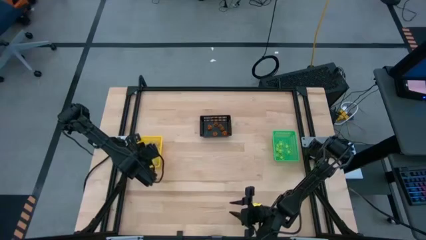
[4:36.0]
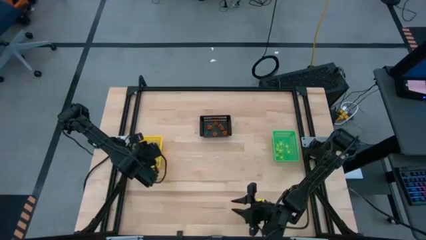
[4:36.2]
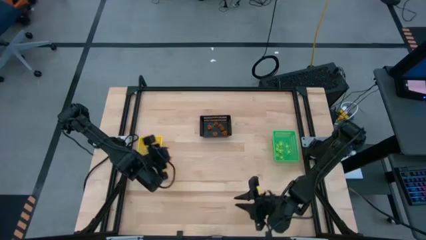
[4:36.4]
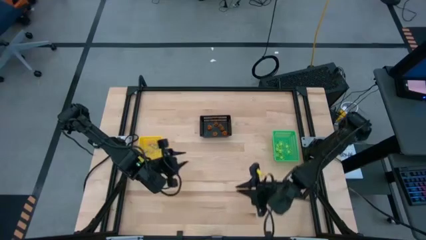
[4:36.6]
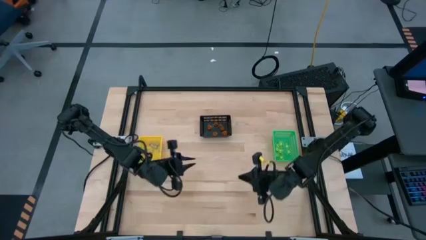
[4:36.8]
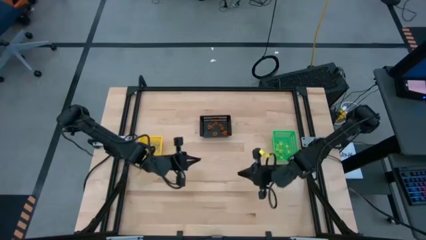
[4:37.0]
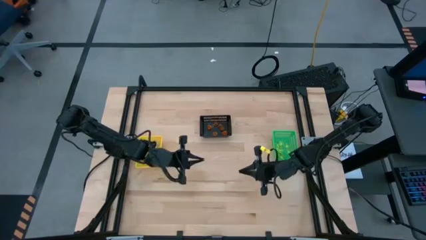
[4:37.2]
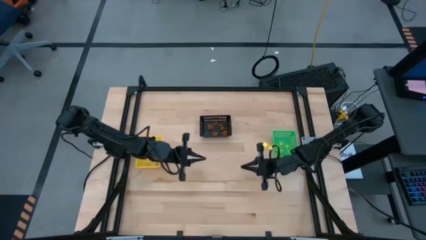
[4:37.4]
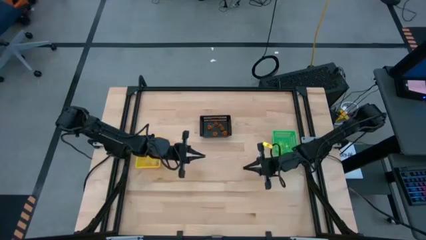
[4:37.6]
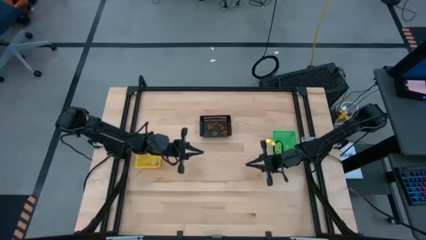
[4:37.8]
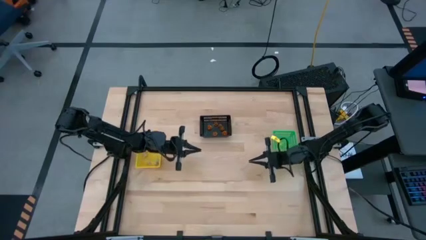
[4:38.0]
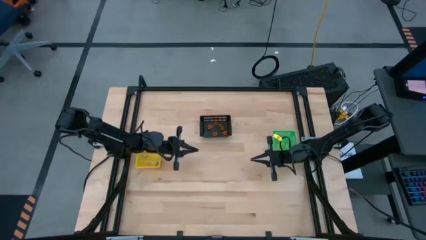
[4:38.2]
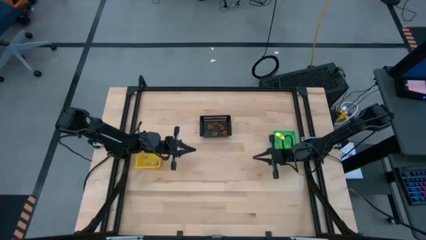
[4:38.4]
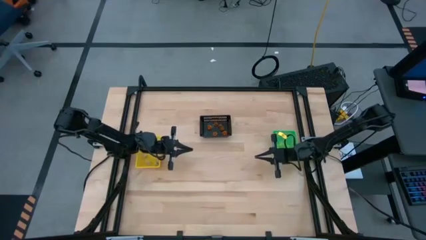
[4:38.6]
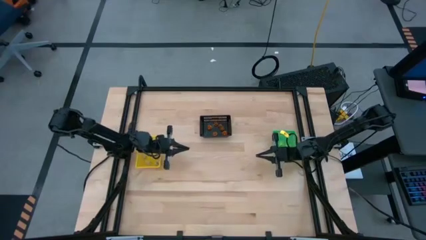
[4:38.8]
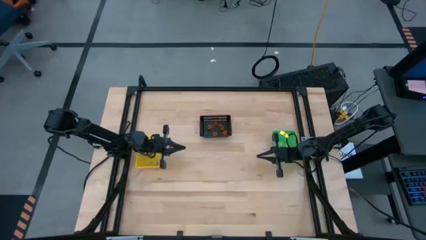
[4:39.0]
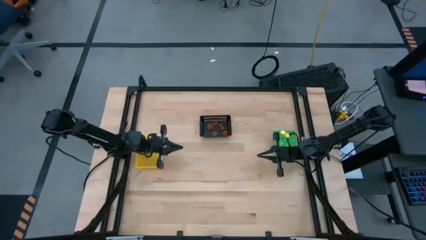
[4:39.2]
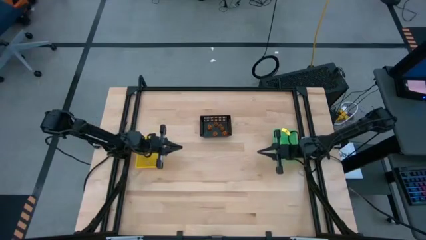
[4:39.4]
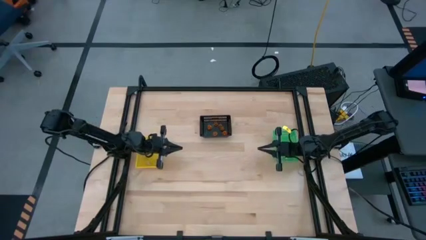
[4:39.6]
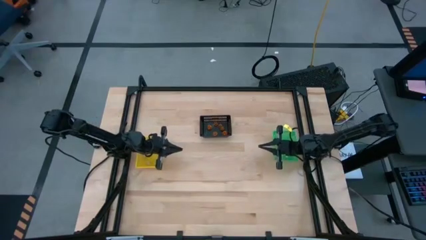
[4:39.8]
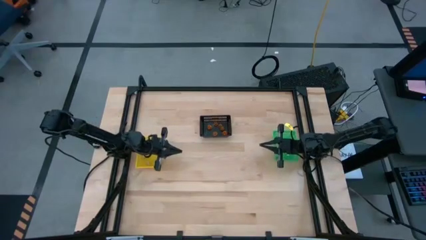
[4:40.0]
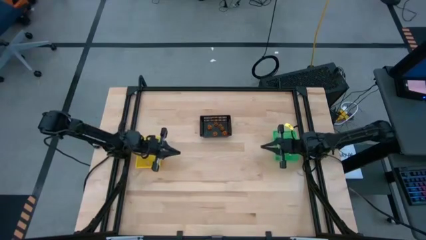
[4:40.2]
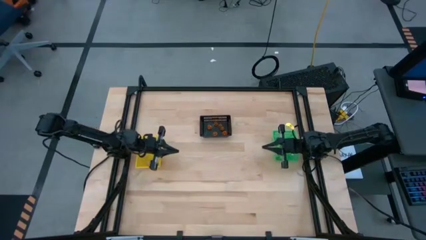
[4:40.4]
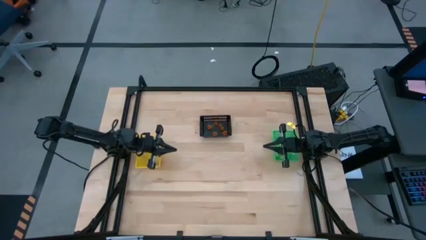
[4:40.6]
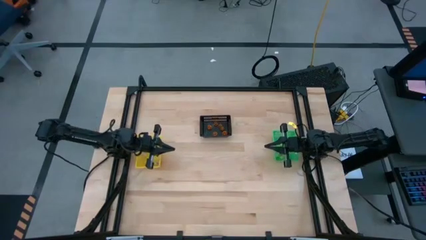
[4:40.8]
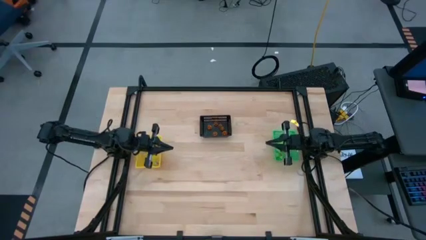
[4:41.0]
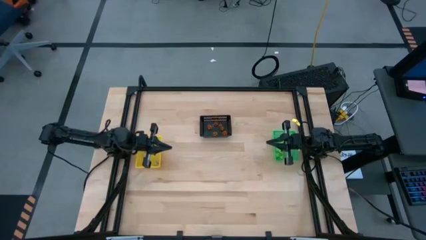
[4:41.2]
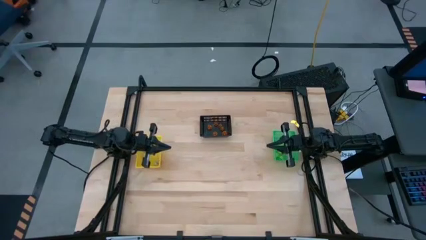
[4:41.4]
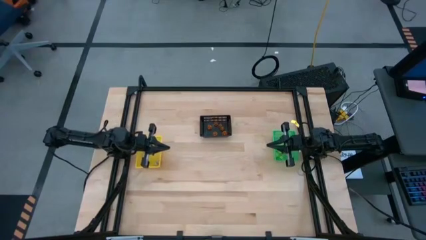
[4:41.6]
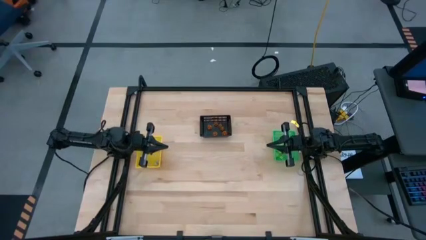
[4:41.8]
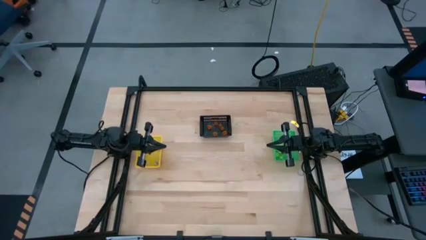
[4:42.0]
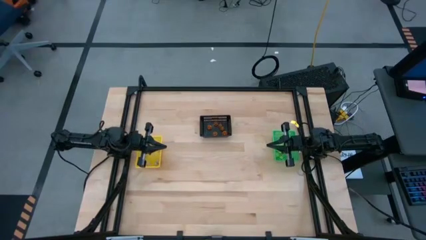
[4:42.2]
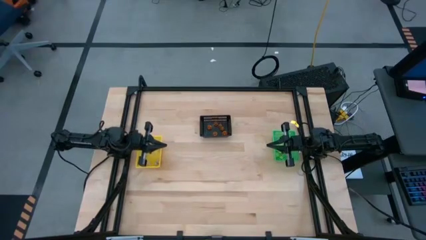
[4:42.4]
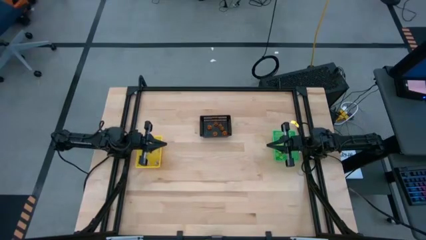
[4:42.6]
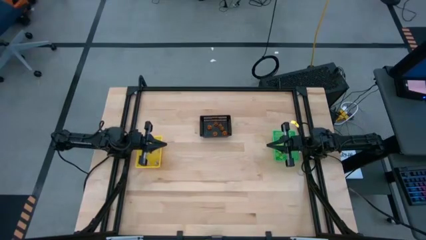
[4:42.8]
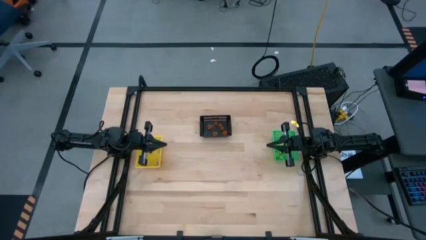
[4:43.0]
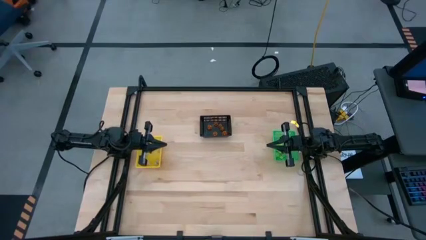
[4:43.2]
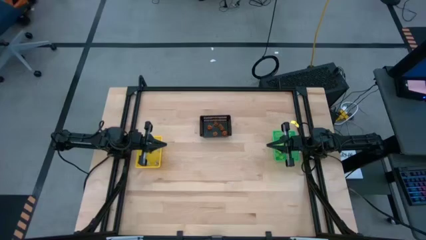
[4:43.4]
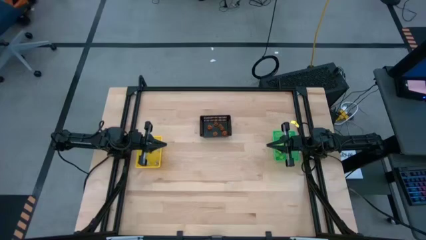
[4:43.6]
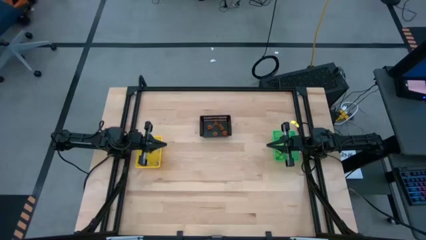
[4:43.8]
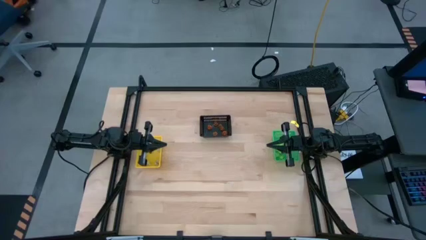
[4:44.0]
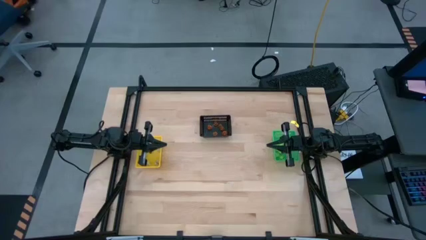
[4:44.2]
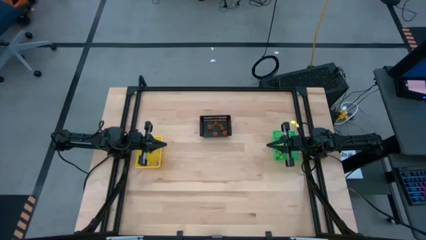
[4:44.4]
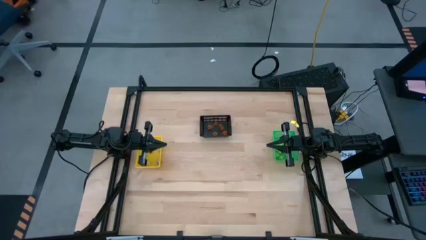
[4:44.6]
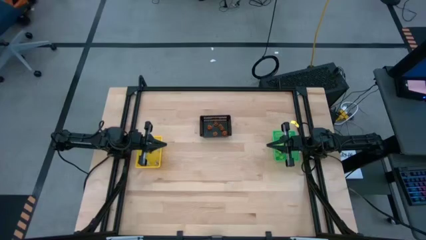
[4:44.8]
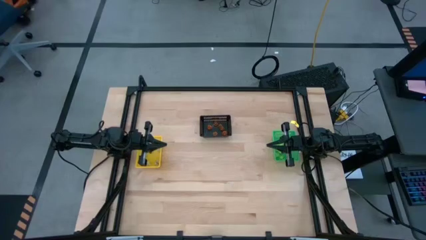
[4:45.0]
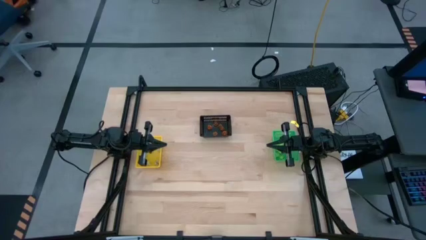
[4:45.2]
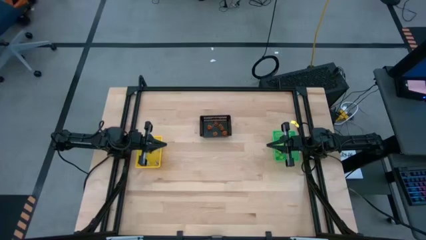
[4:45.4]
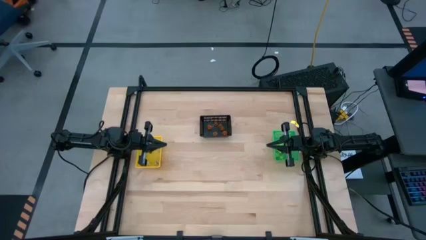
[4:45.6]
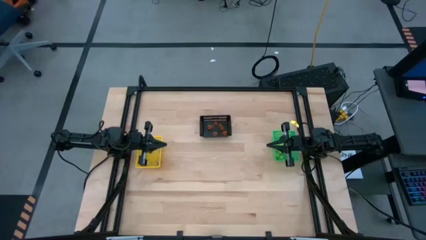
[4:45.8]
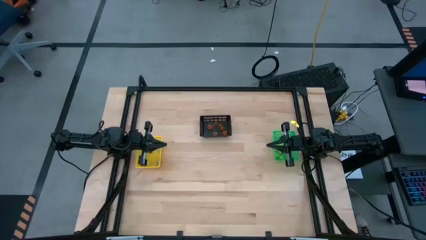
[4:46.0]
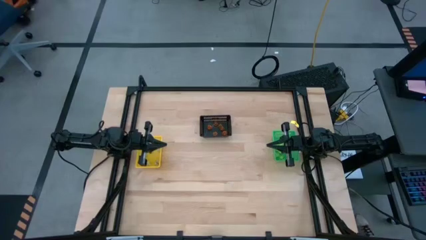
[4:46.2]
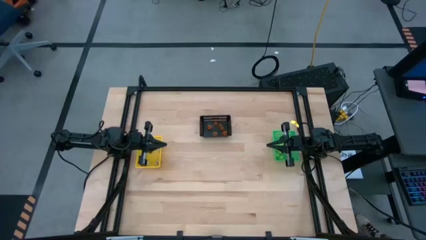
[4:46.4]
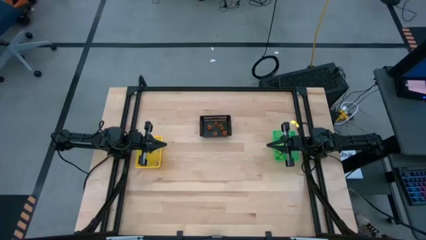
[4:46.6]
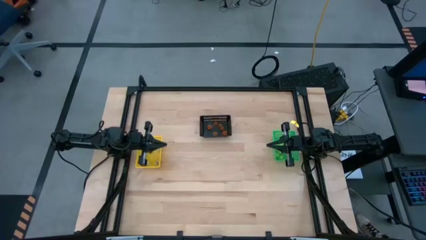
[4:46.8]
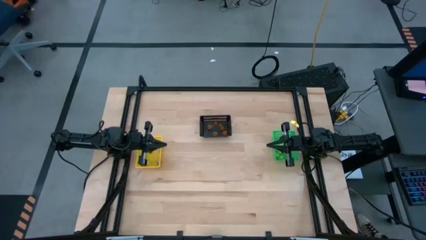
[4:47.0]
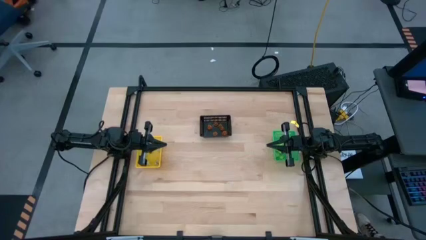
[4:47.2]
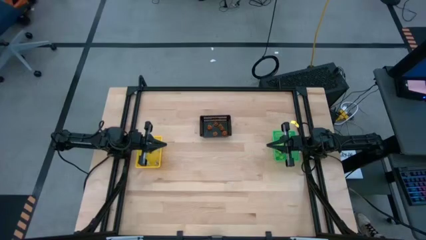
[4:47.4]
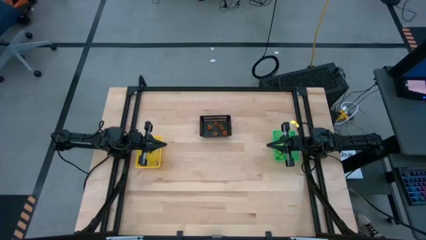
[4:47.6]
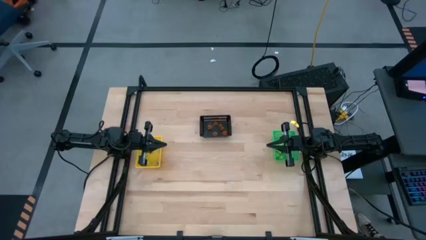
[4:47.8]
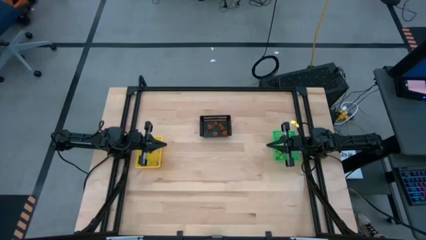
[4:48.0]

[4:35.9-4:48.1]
Task: Sort Halloween decoration
Return to Home Position
